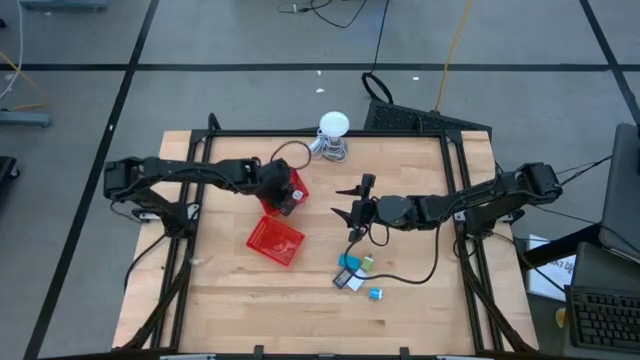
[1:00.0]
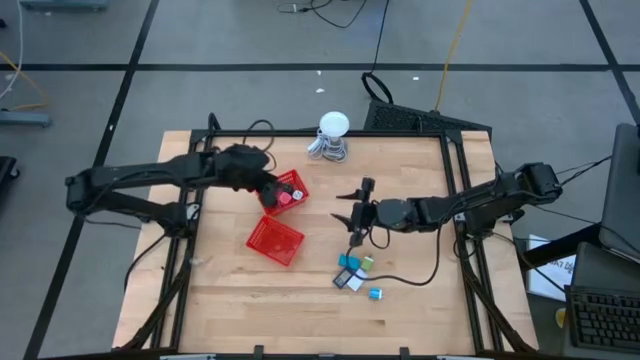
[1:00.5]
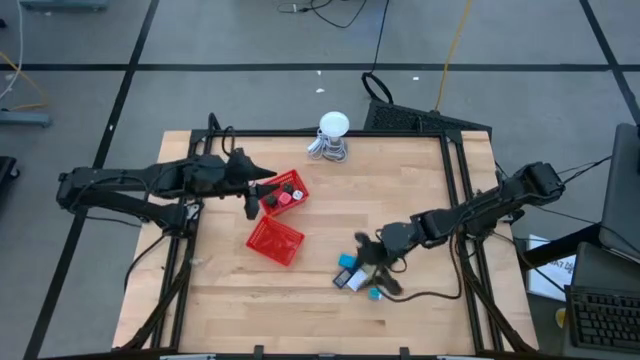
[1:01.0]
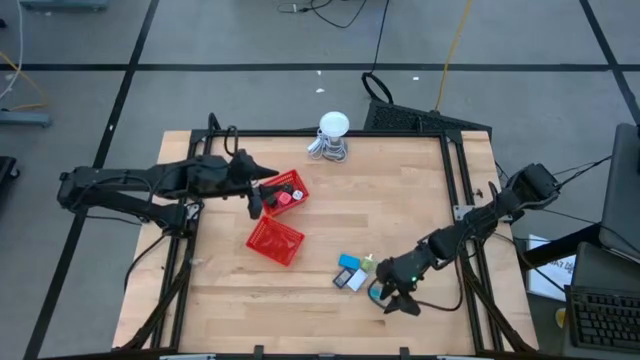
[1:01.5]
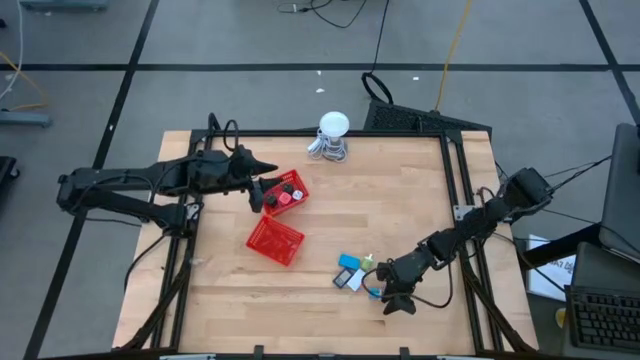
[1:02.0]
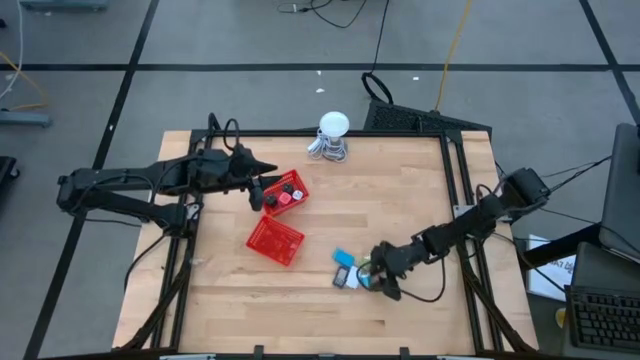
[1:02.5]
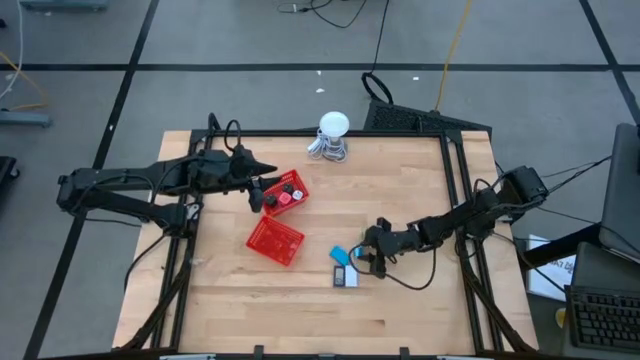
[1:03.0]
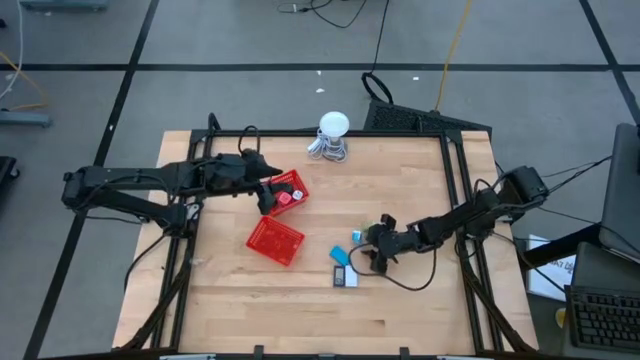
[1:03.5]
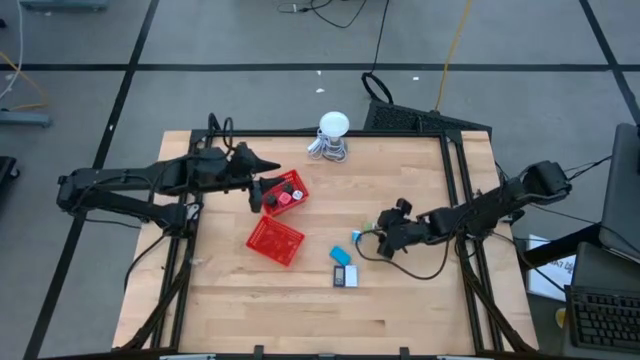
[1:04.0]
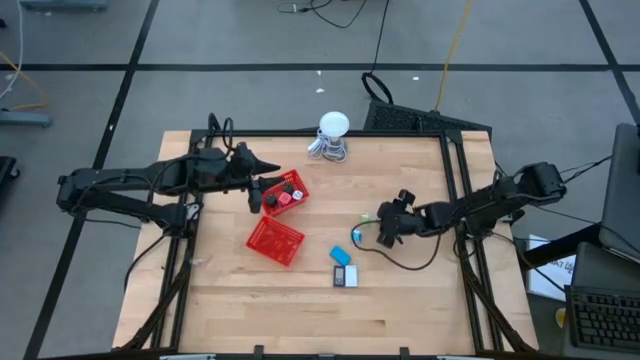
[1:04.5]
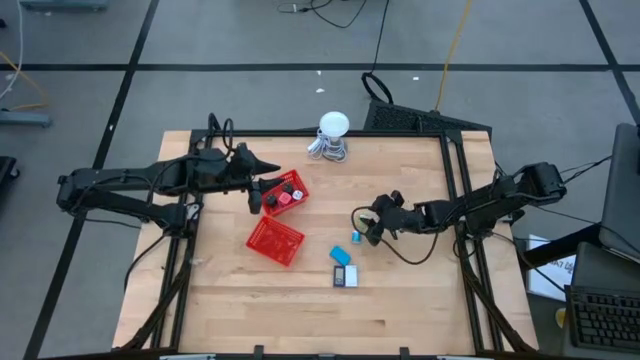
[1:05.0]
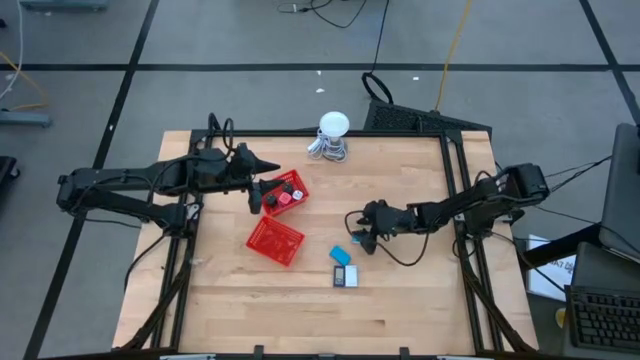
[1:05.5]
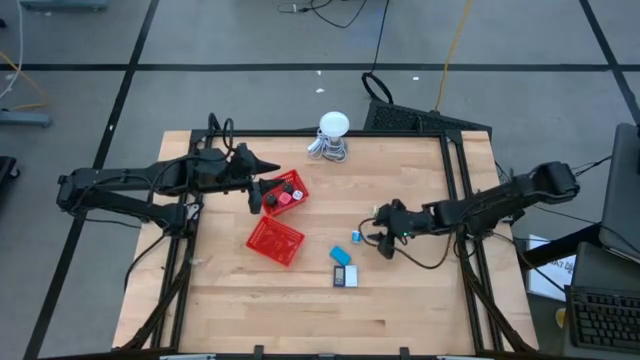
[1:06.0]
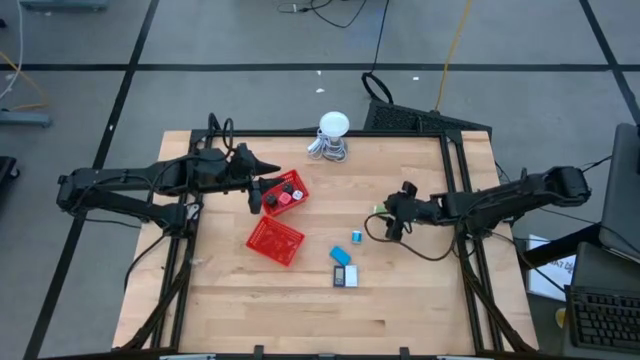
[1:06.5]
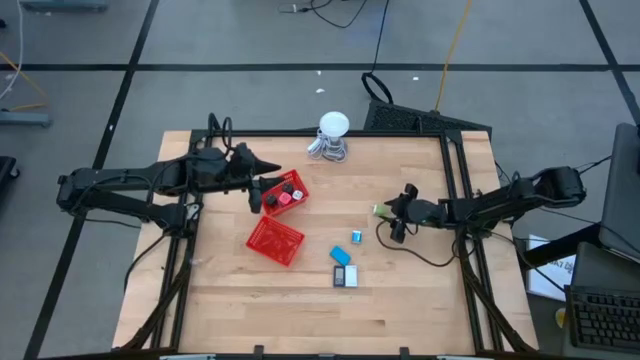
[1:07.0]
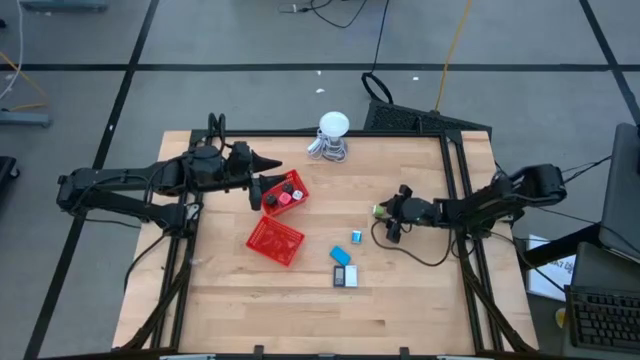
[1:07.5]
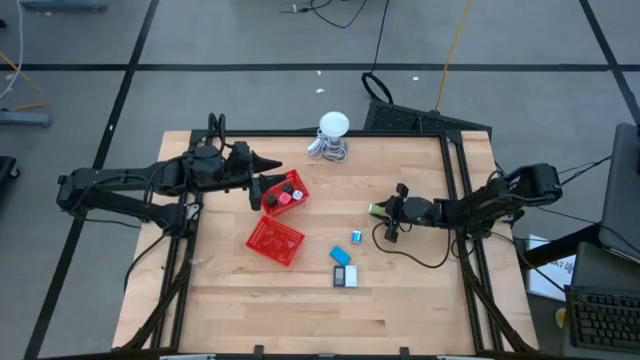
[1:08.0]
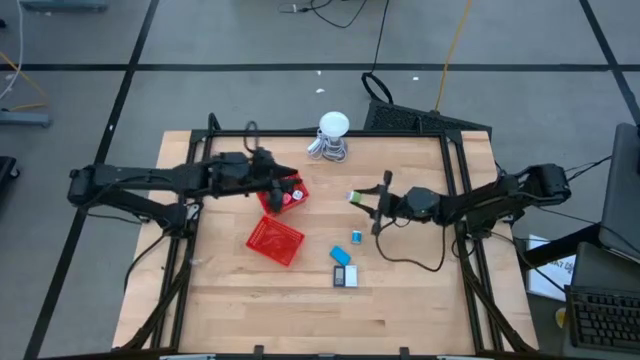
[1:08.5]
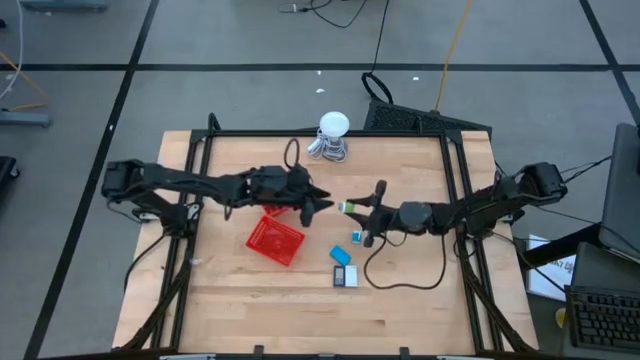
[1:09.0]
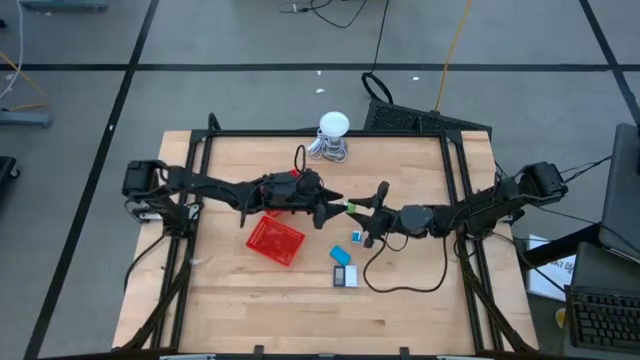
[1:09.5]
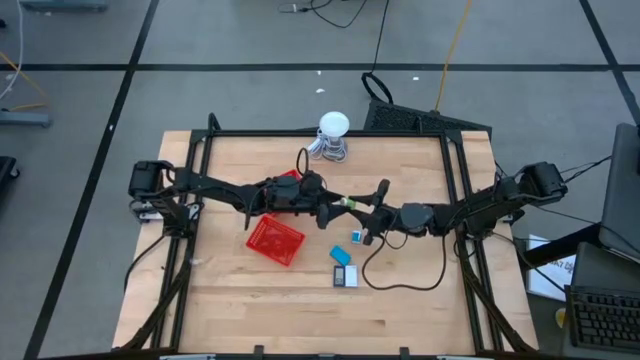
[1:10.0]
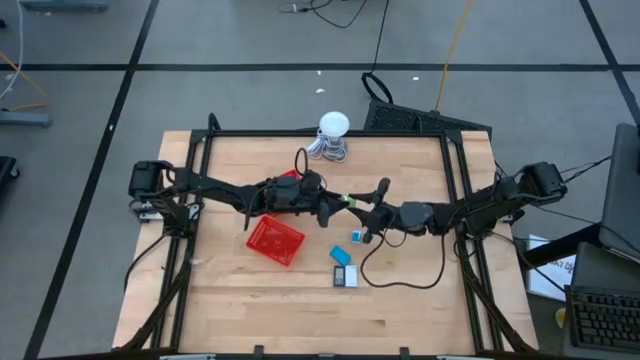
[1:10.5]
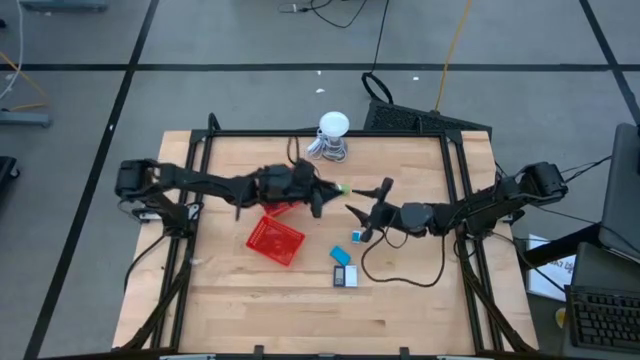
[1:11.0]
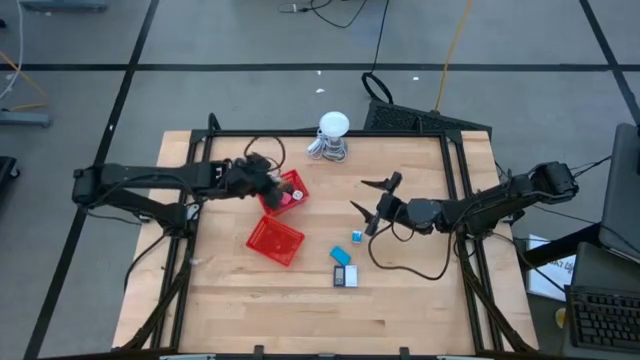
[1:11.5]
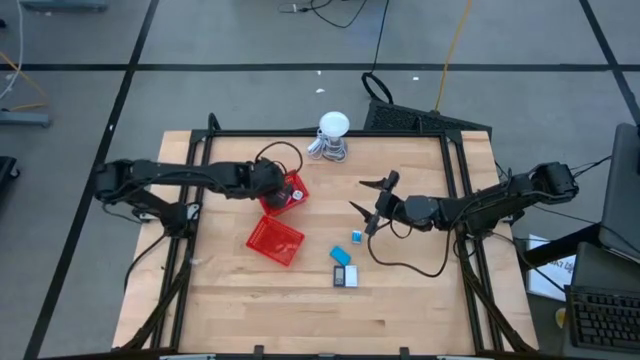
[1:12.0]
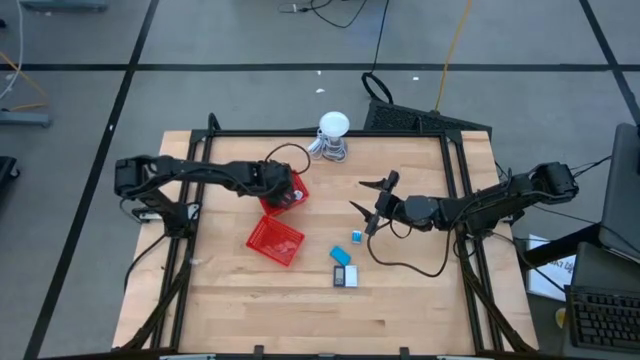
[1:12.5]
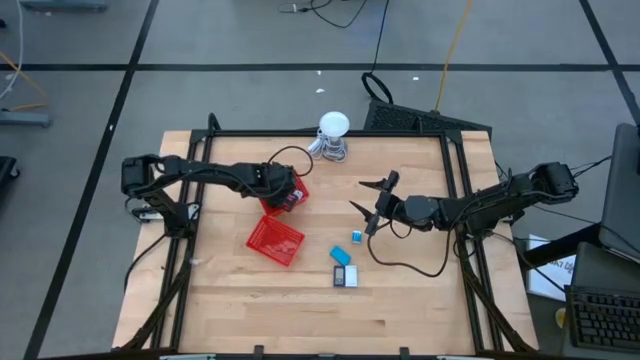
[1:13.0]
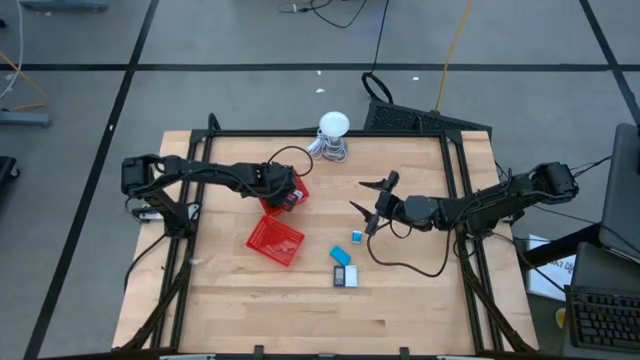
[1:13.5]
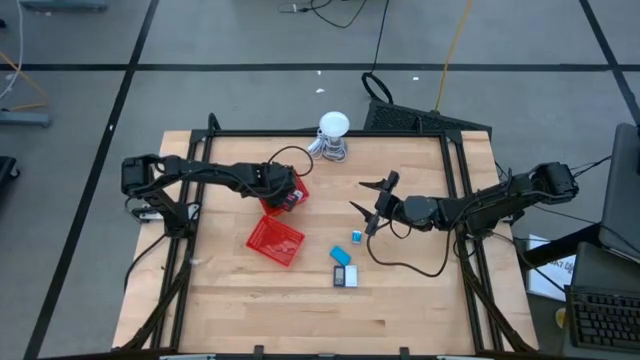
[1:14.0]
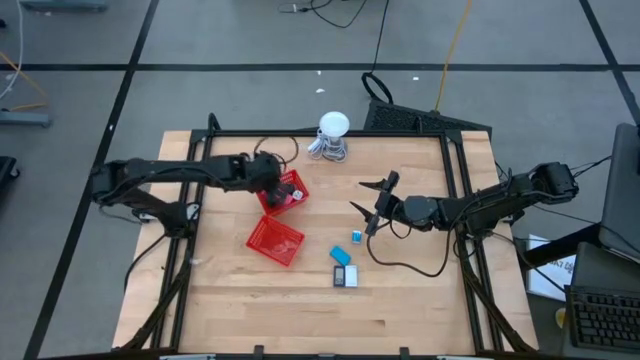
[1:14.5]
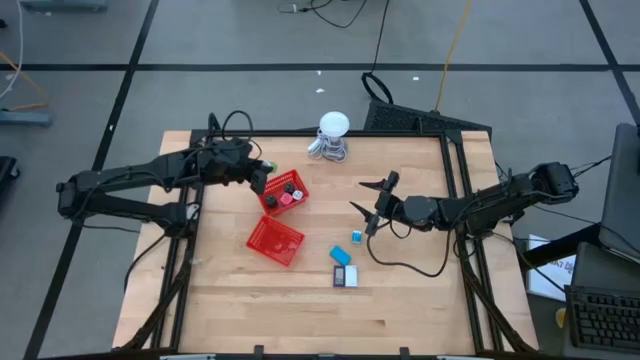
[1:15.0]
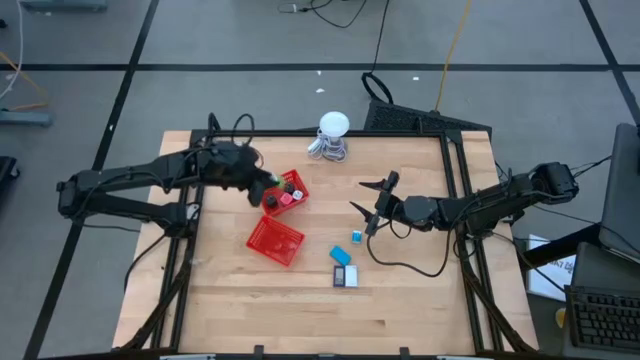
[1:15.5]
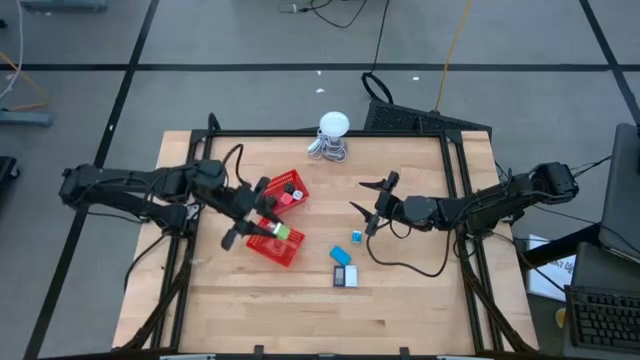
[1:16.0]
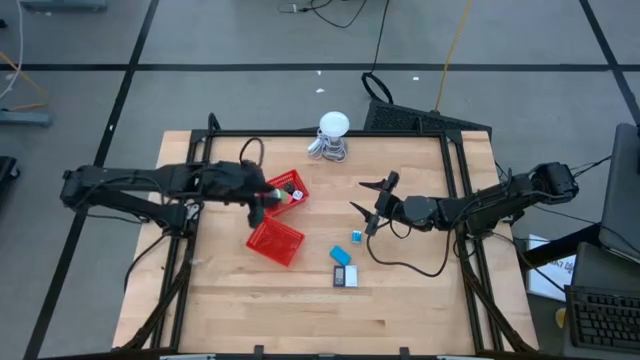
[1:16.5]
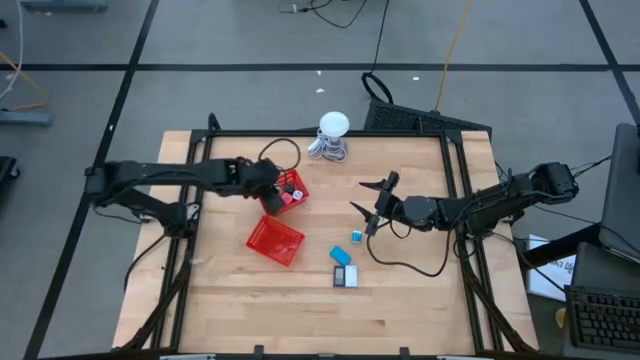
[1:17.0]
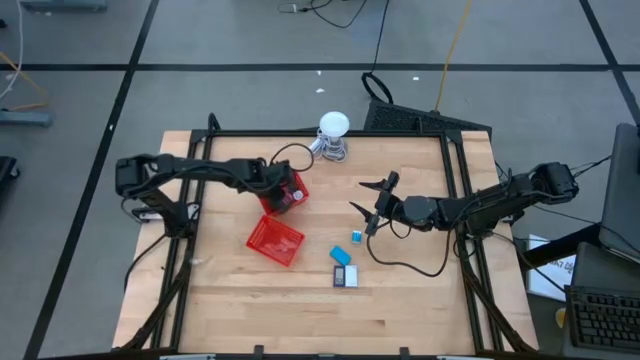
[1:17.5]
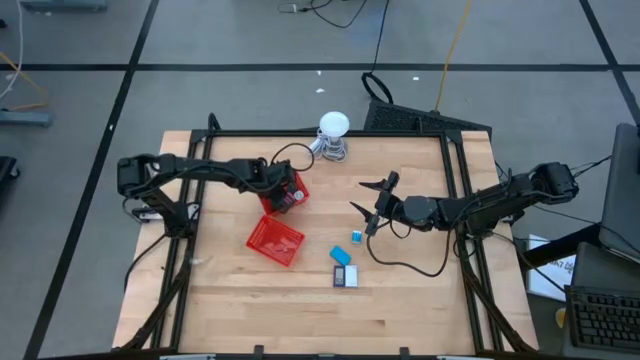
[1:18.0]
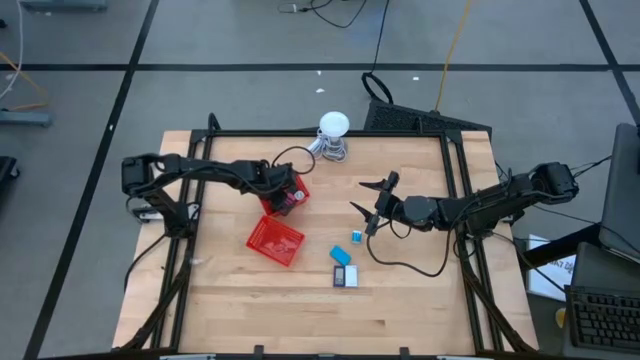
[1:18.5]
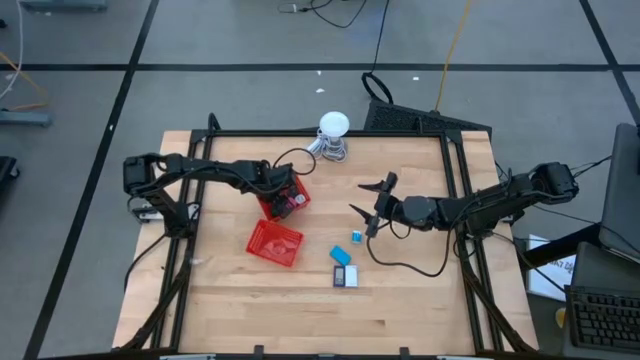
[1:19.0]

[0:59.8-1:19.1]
Task: Pick & Place Office items
Put the green charger adapter into the top red basket
